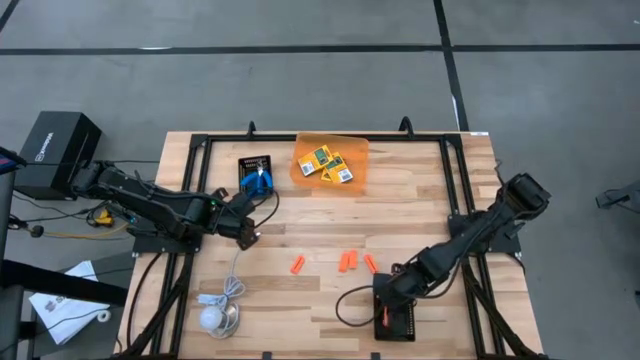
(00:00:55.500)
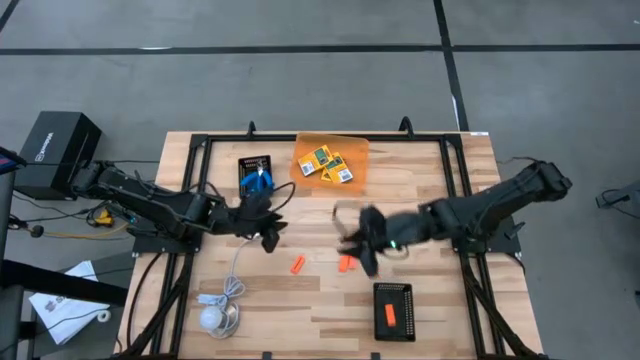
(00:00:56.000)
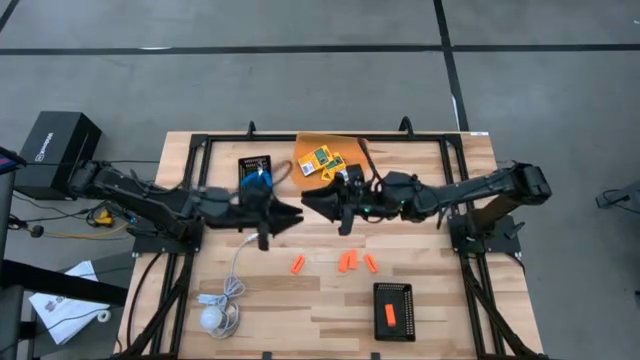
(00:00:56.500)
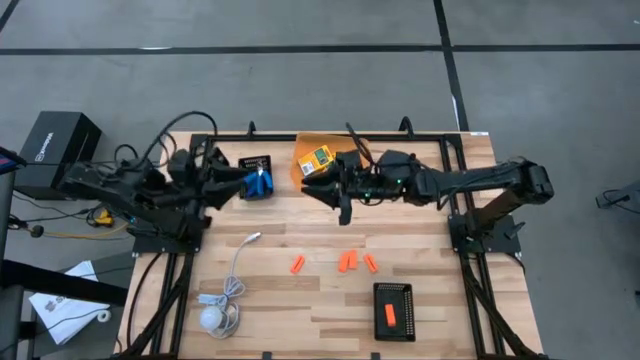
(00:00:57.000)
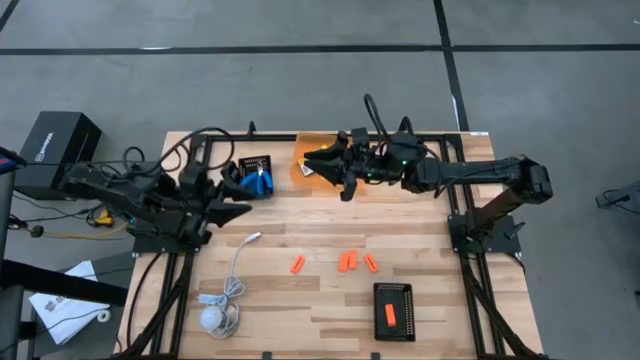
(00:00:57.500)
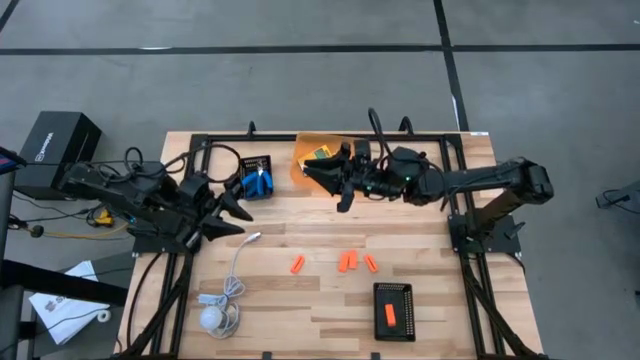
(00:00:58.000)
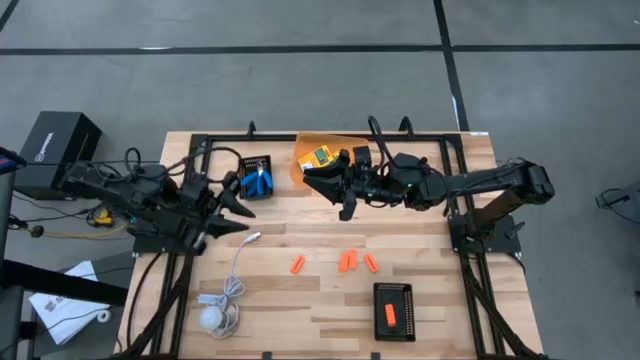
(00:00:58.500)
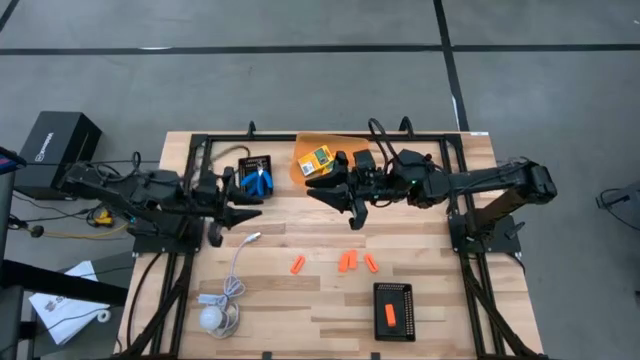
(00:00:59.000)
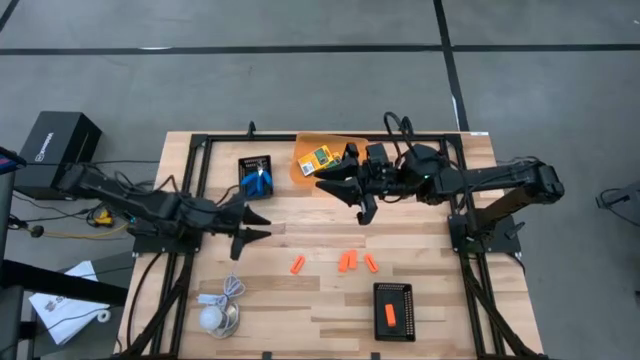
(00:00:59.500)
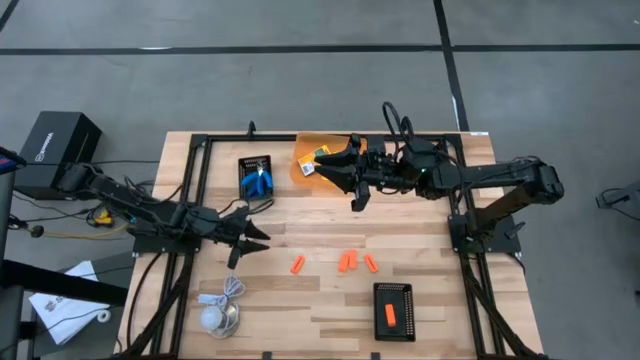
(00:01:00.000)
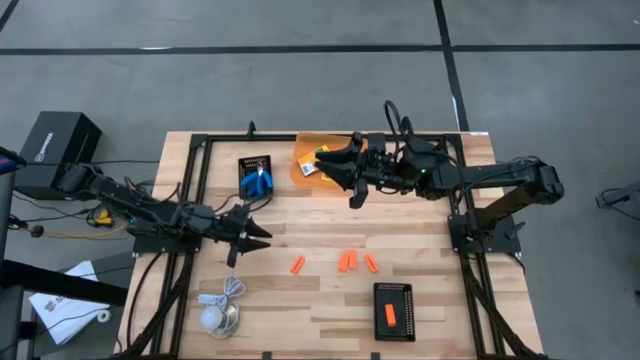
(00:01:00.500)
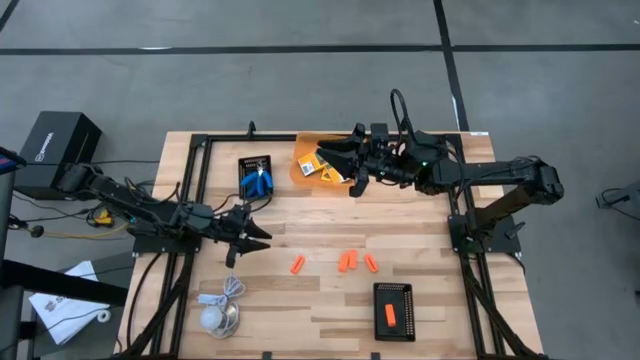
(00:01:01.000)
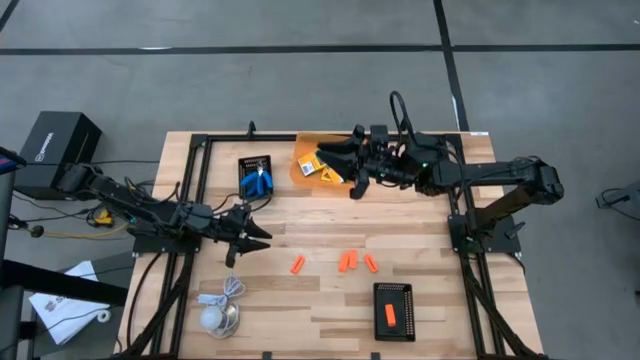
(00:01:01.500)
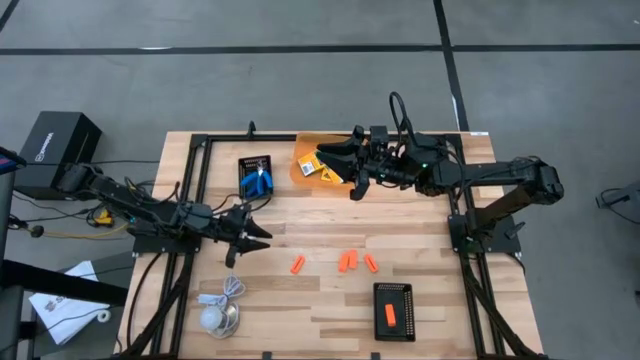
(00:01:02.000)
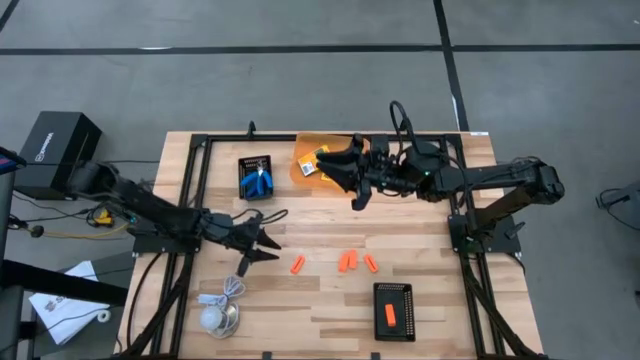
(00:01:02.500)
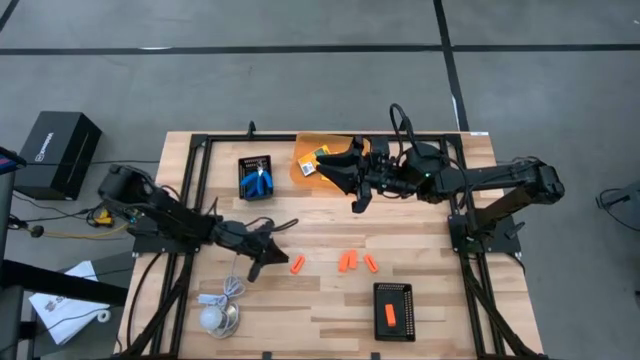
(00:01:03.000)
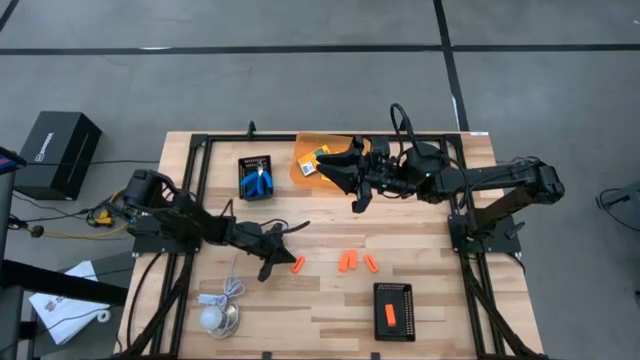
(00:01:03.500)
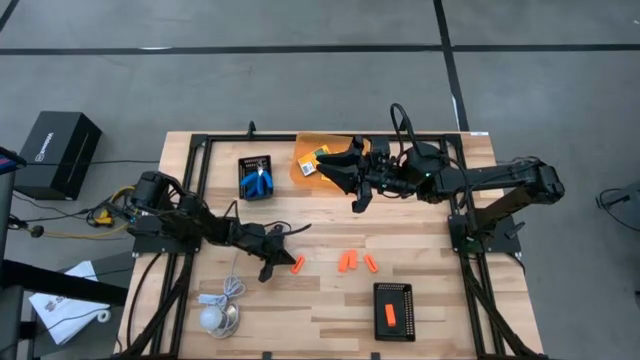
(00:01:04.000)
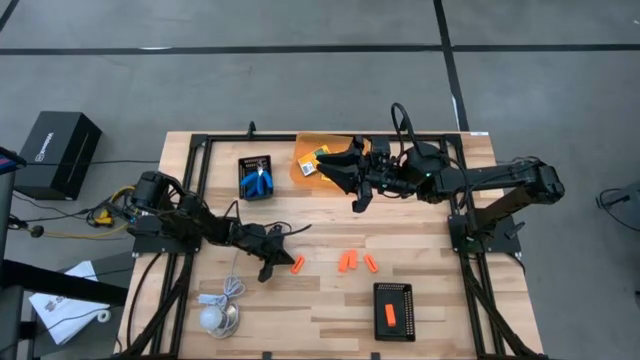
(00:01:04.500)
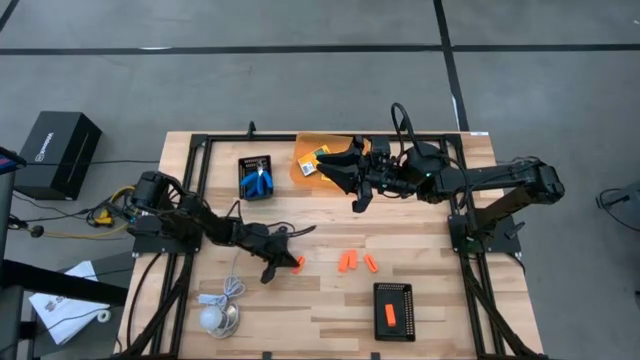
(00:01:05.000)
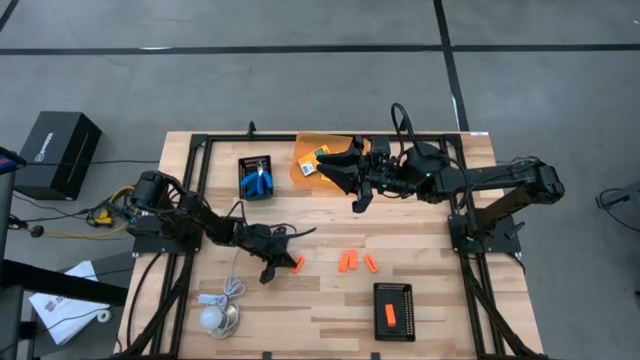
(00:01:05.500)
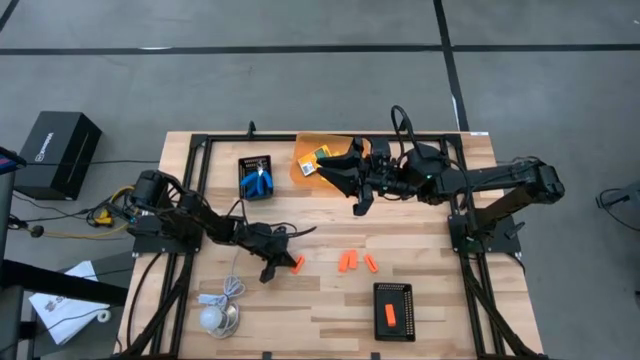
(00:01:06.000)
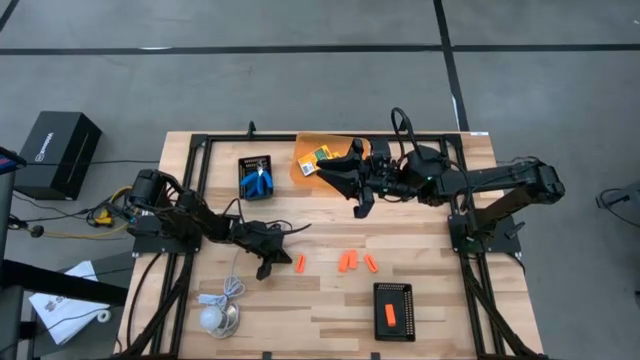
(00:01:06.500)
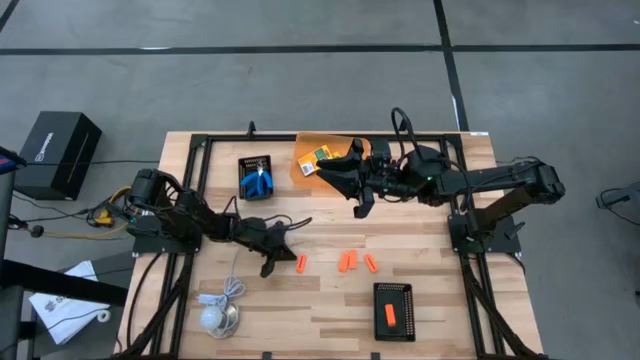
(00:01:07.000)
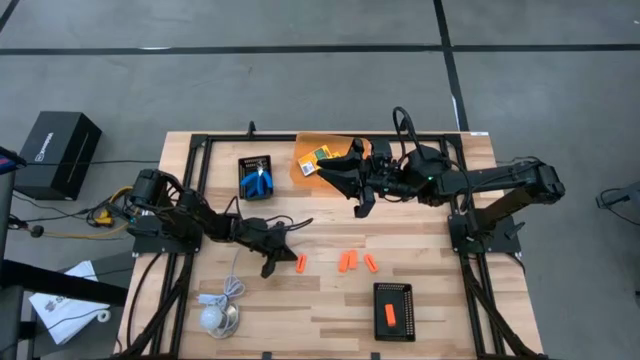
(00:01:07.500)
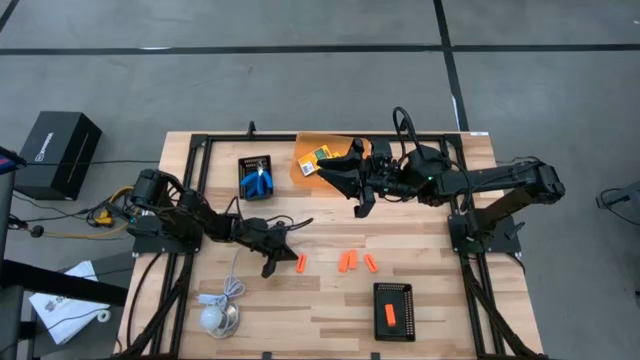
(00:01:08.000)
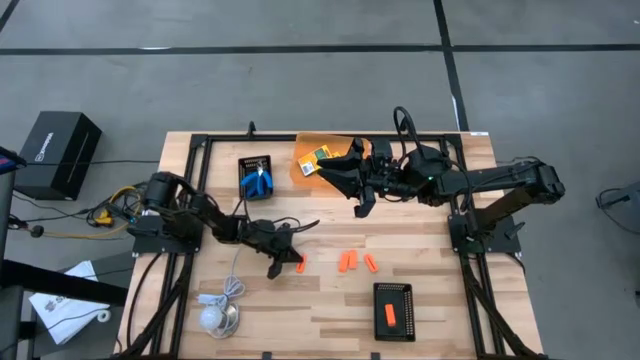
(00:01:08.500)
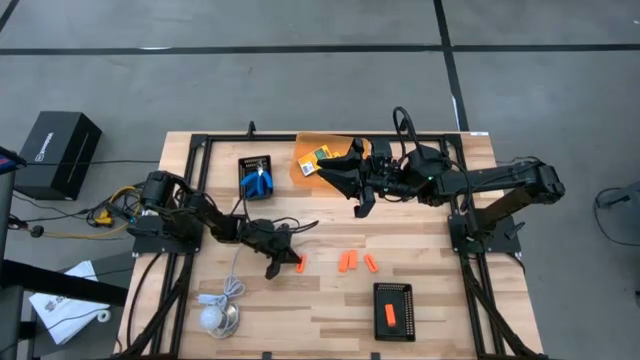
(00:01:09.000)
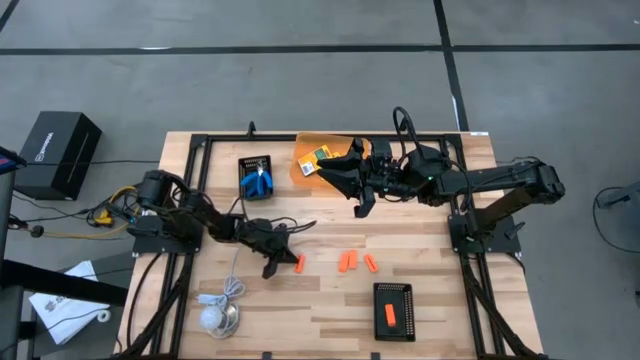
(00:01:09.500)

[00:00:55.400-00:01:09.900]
Task: Pick & Place School Supplies
Put the eraser into the bottom black bin

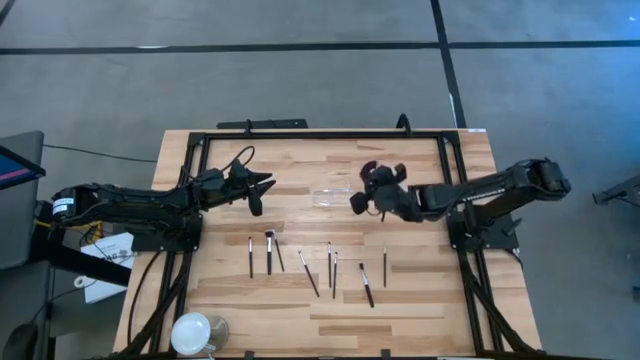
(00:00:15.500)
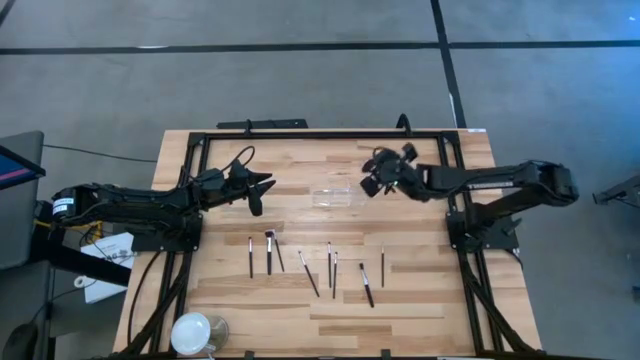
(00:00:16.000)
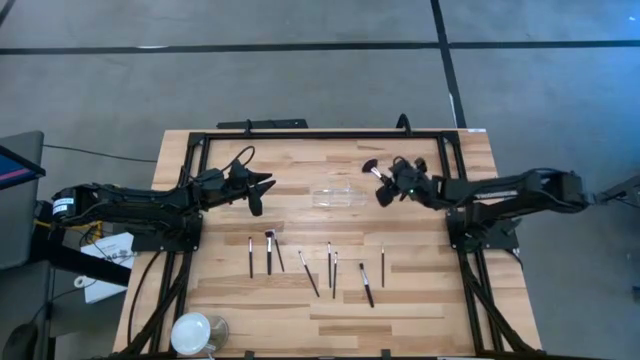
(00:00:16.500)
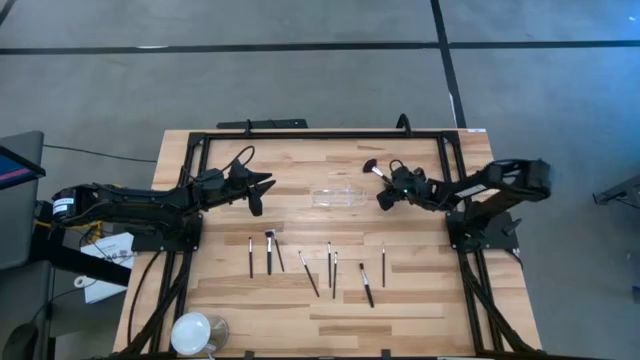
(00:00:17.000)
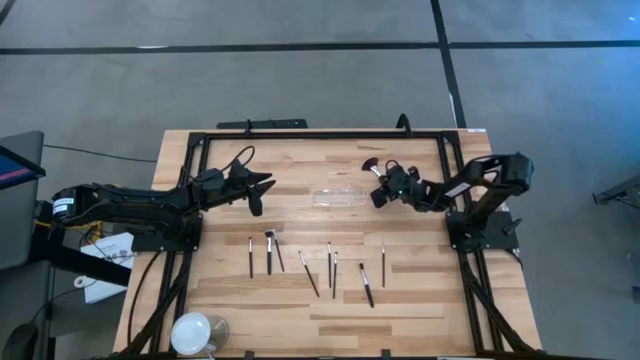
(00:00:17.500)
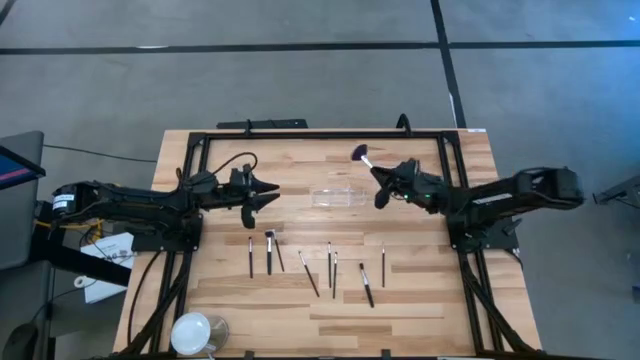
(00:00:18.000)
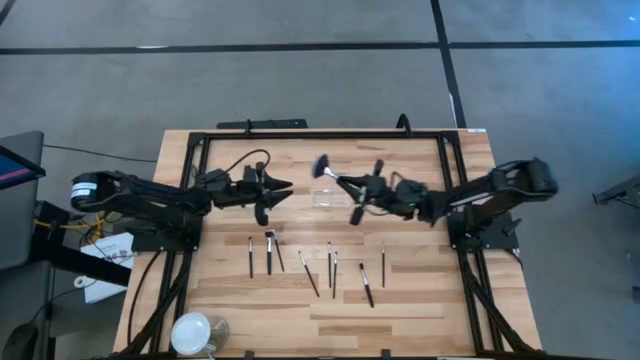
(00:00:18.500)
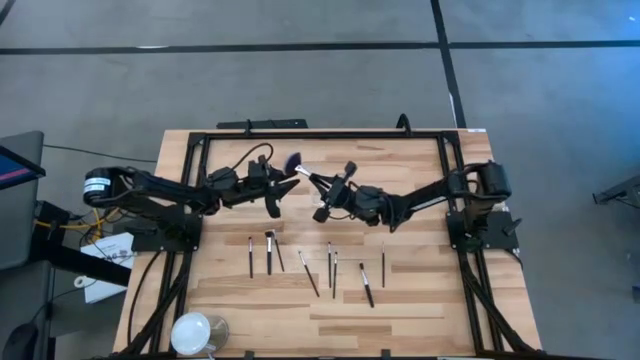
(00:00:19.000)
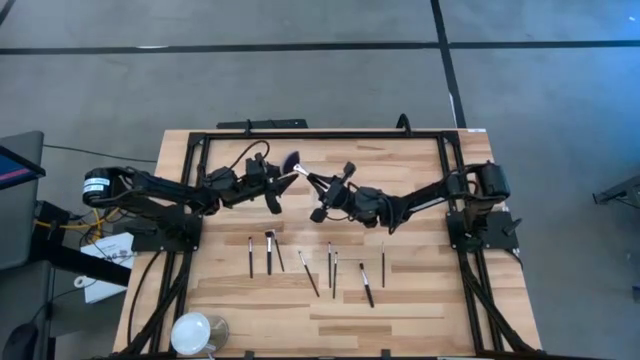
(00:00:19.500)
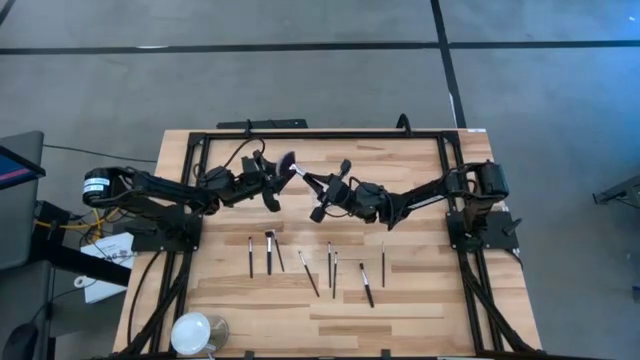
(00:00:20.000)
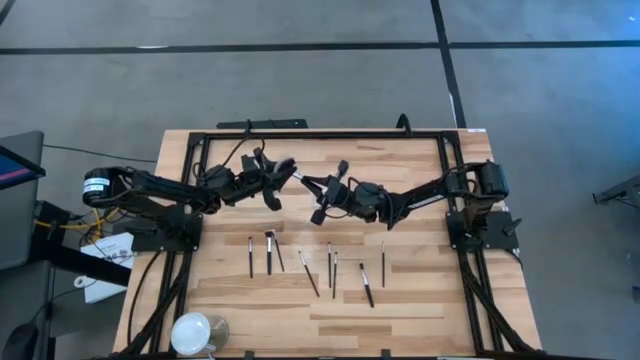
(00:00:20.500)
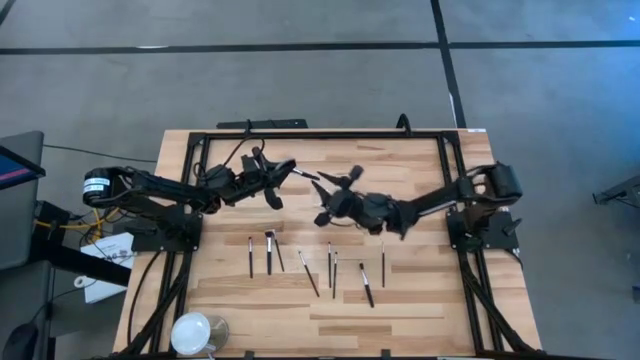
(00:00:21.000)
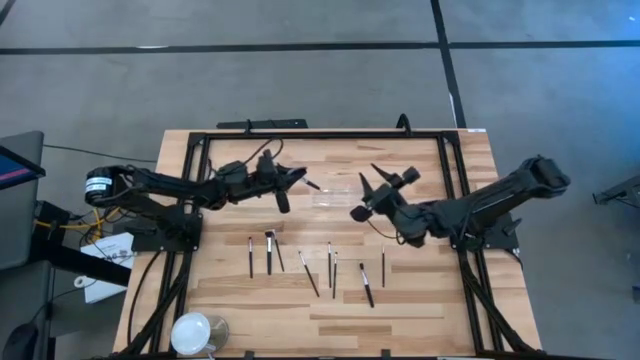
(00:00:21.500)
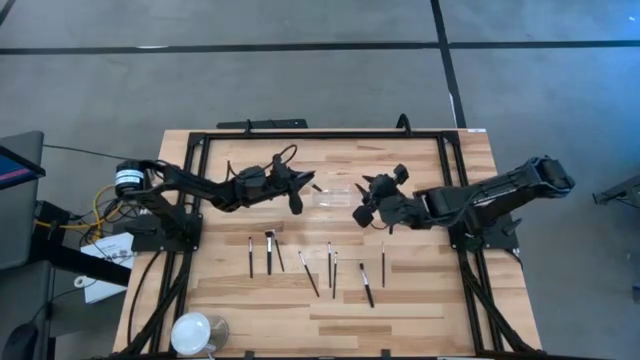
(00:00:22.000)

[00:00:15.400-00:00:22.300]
Task: Put items in baskets/containers
Put the highlighter brush into the left section of the transparent organizer
